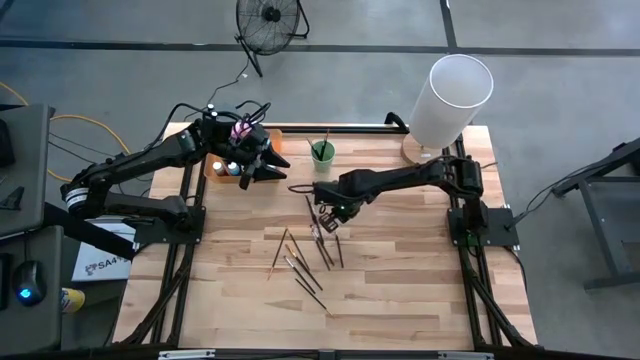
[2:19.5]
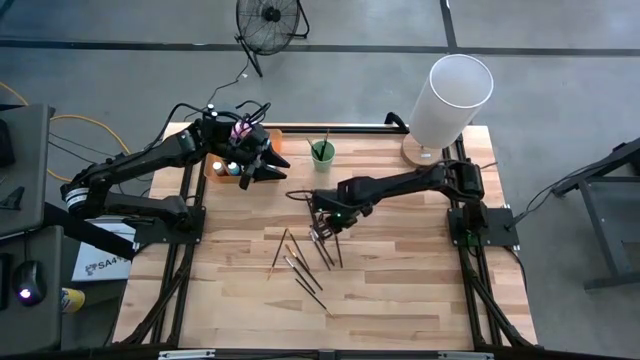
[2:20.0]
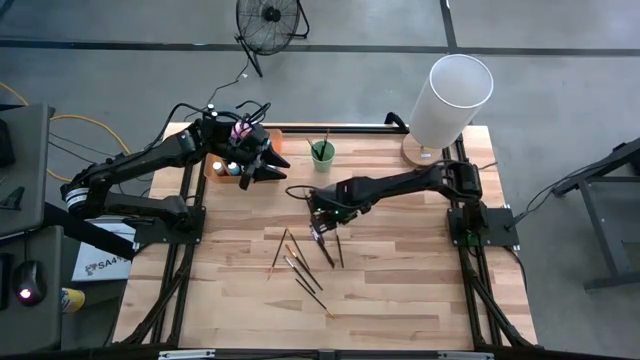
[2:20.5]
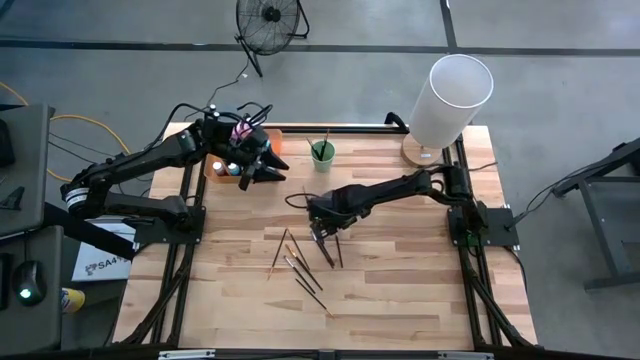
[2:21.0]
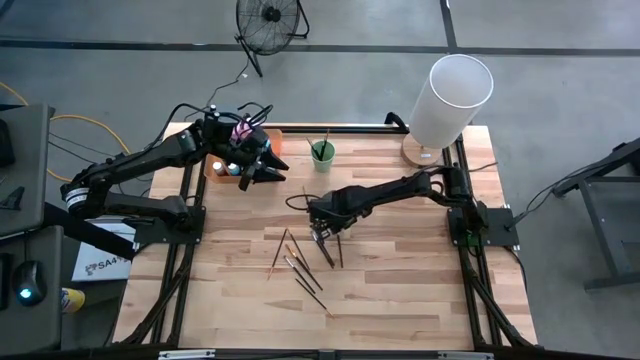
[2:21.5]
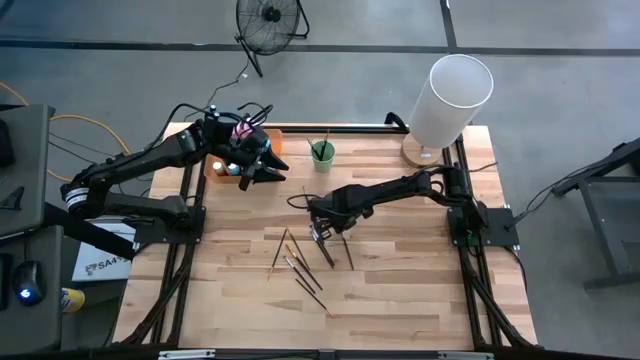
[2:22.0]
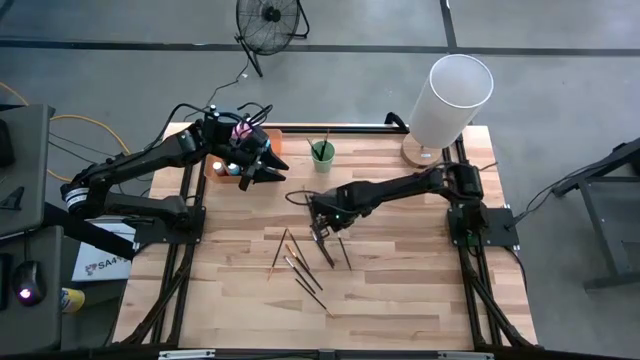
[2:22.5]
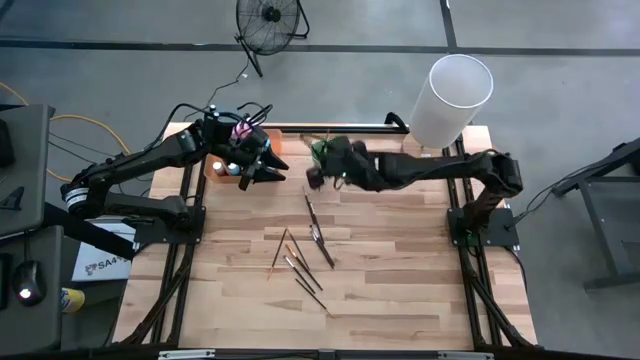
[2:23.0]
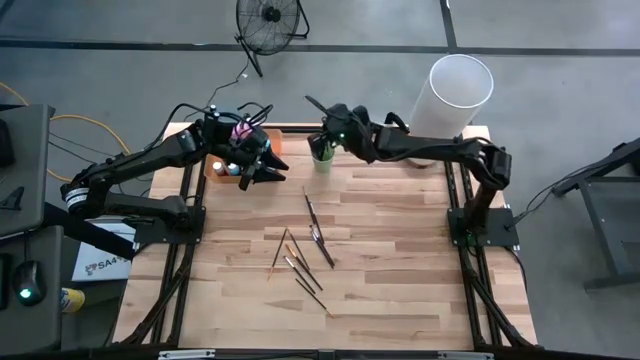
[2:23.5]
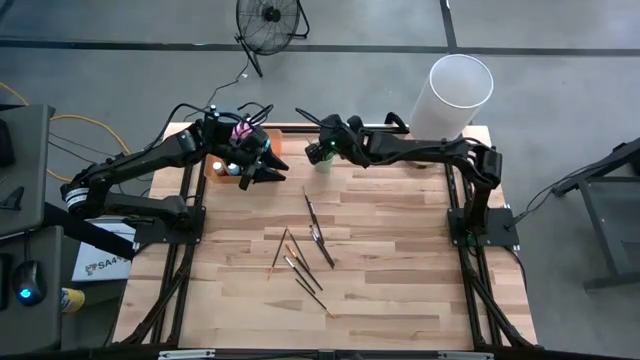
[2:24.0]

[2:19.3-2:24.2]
Task: Pick & Place Paint Supplies
Put the black paint brush into the green cup

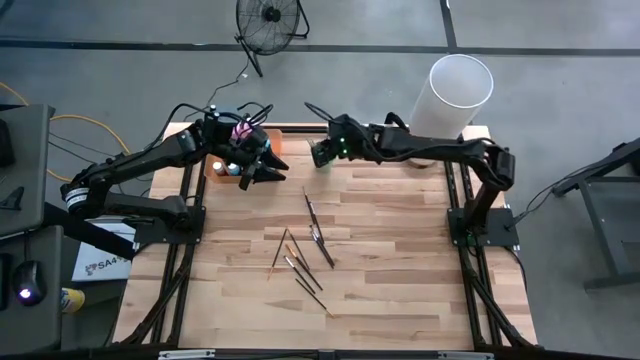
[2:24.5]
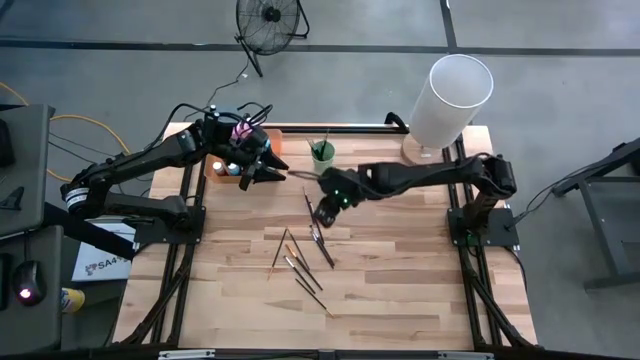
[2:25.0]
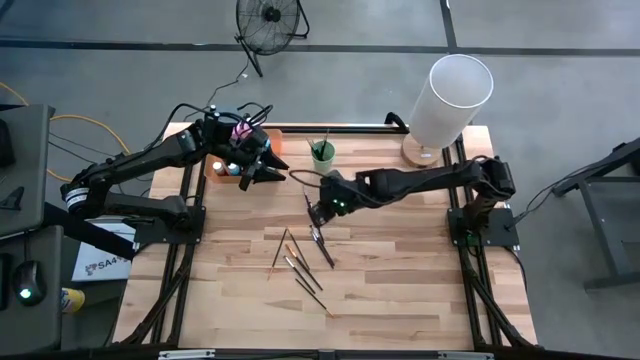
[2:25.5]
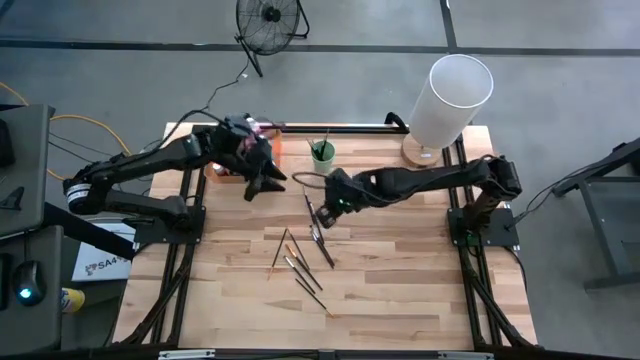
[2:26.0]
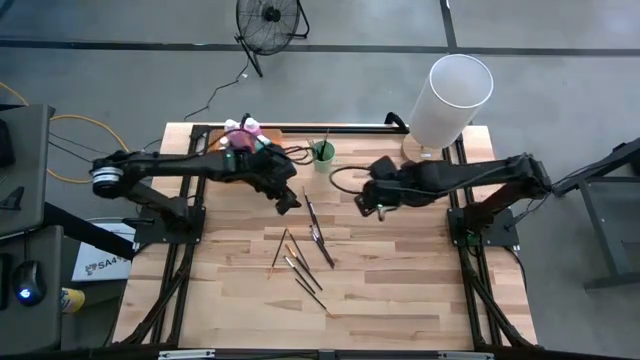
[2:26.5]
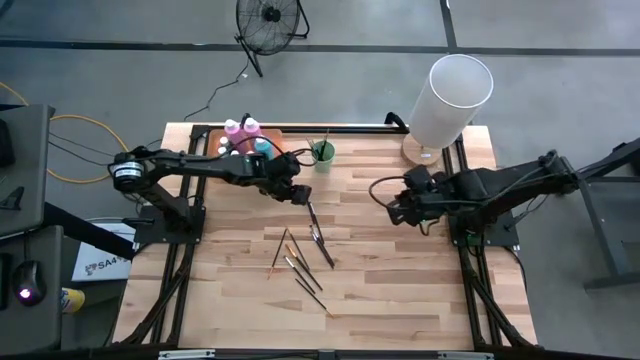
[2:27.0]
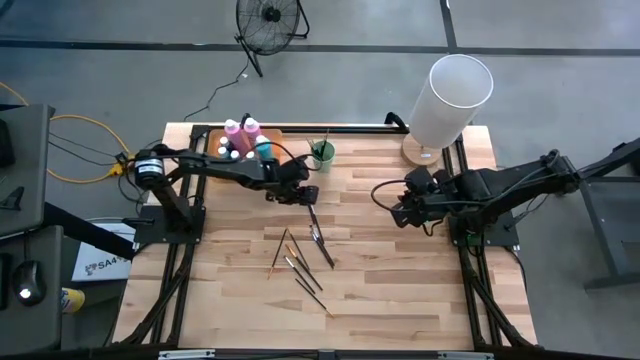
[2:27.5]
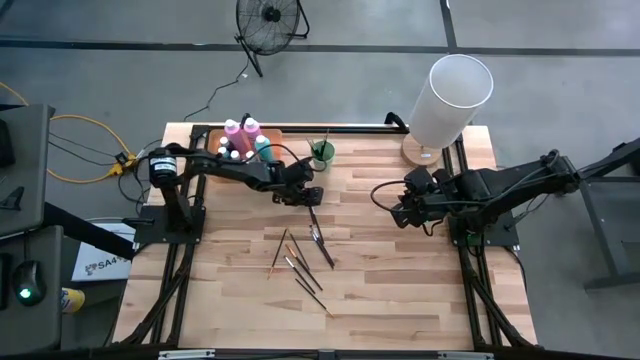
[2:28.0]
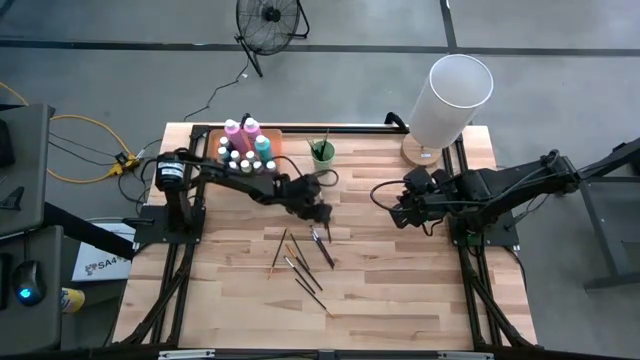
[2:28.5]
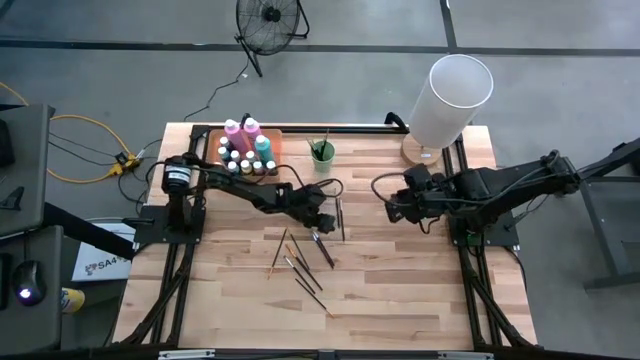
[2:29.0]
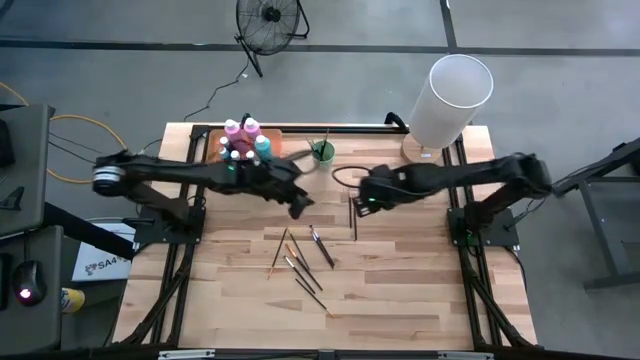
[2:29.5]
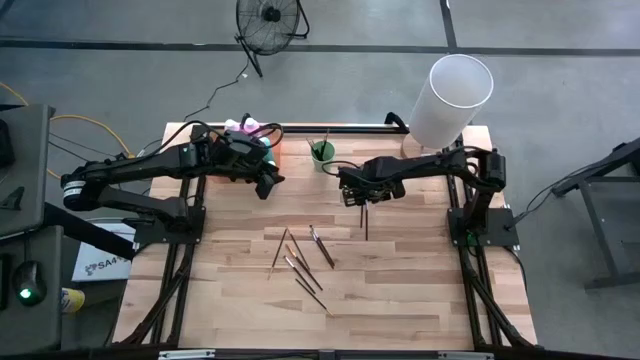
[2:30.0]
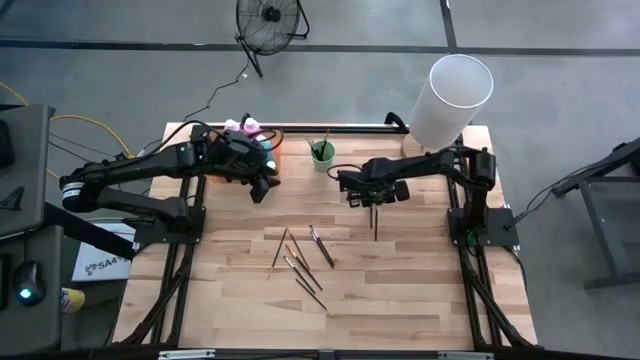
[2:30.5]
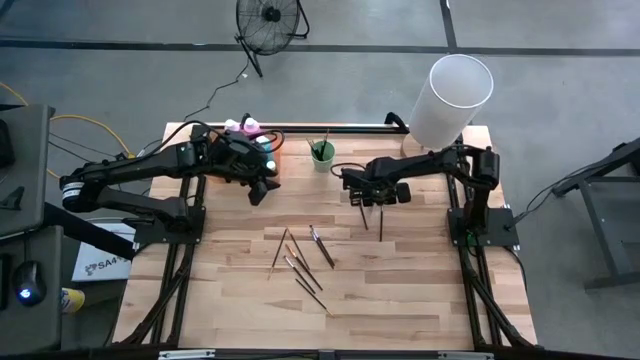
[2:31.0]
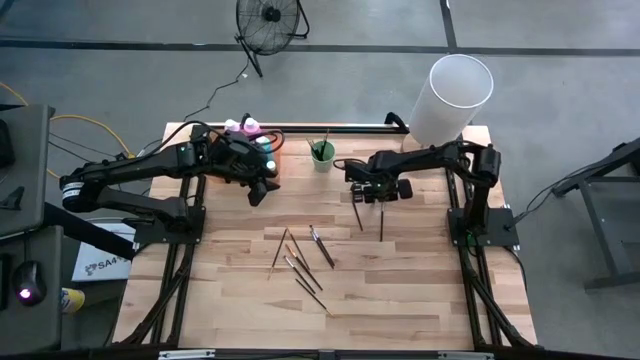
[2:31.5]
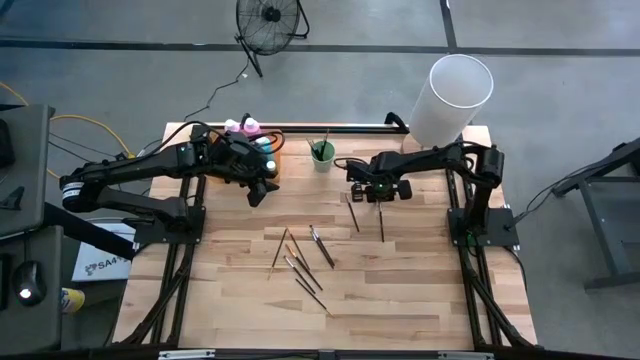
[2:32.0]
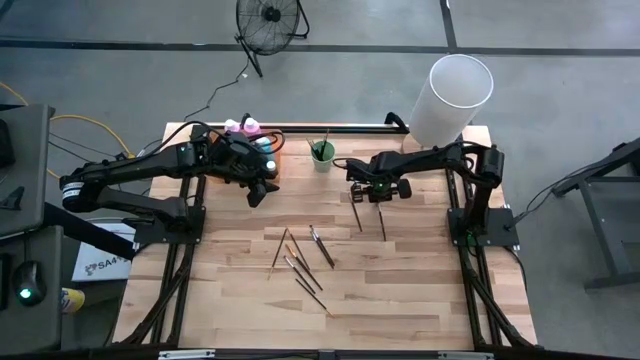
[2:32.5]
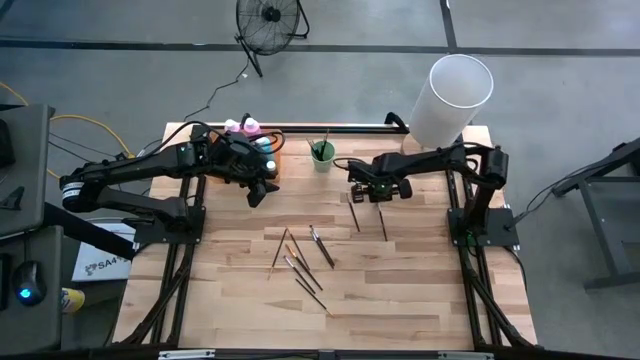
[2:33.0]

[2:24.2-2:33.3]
Put the black paint brush into the green cup

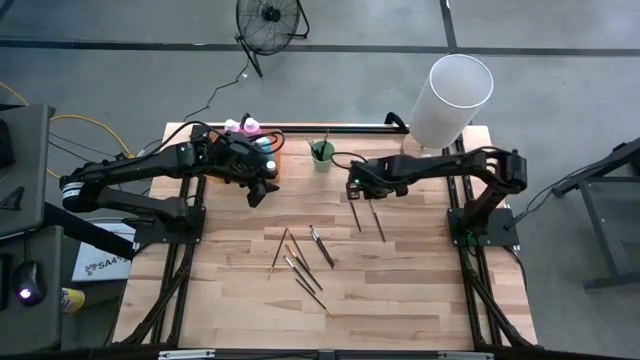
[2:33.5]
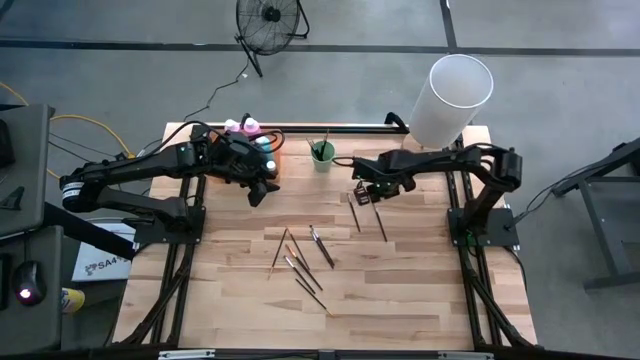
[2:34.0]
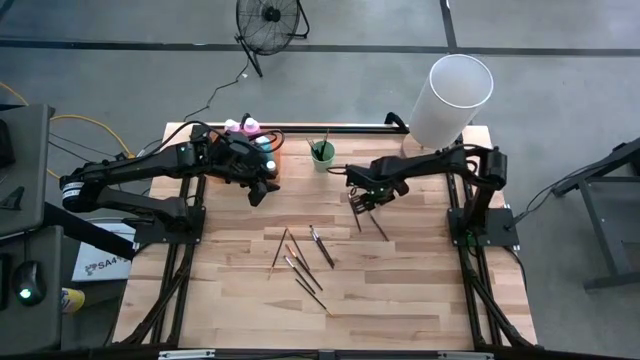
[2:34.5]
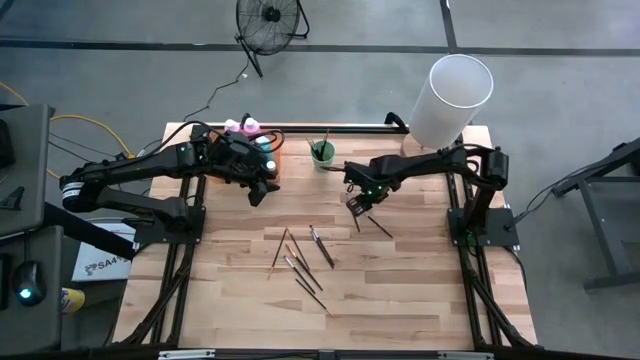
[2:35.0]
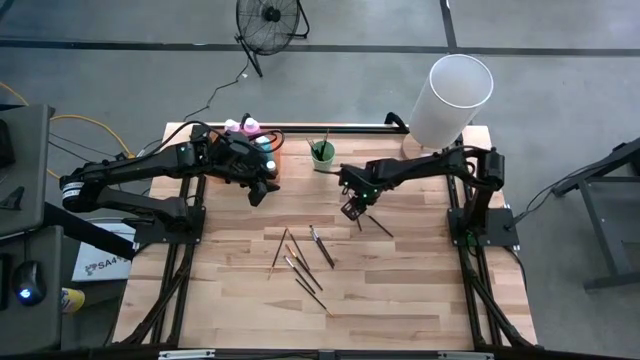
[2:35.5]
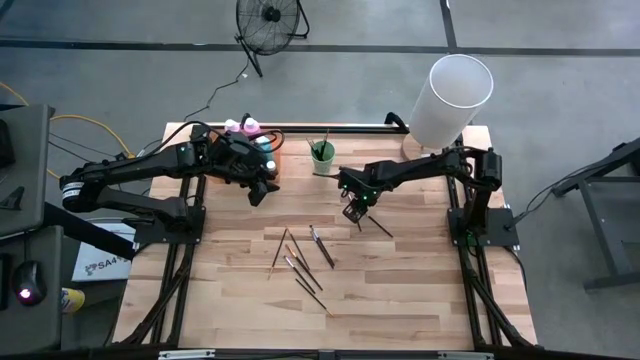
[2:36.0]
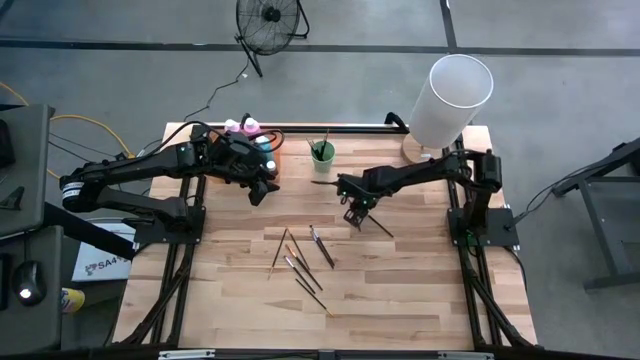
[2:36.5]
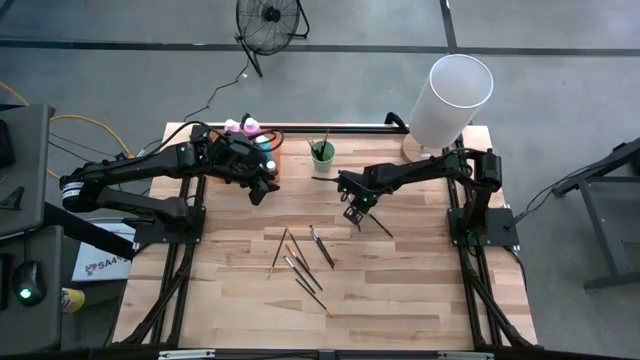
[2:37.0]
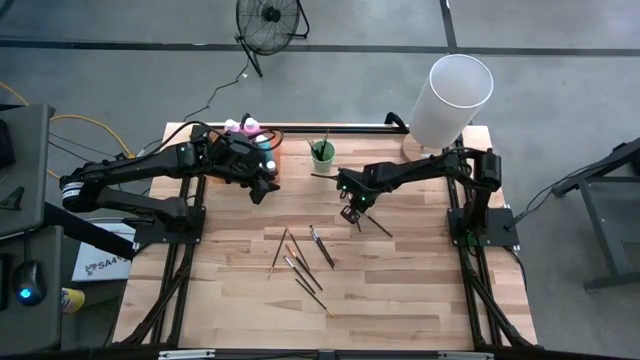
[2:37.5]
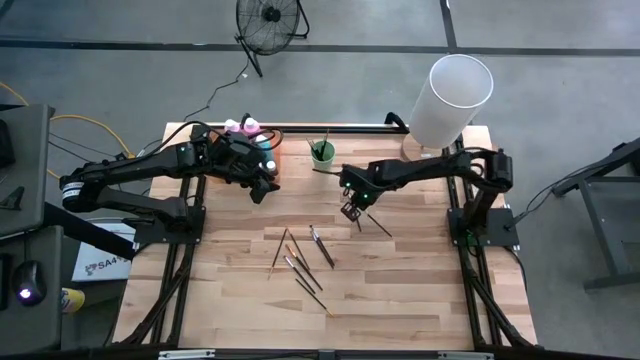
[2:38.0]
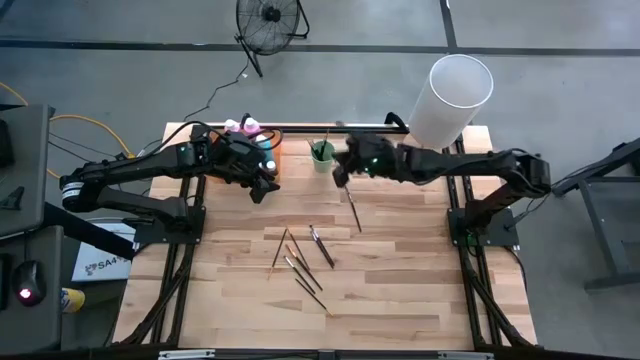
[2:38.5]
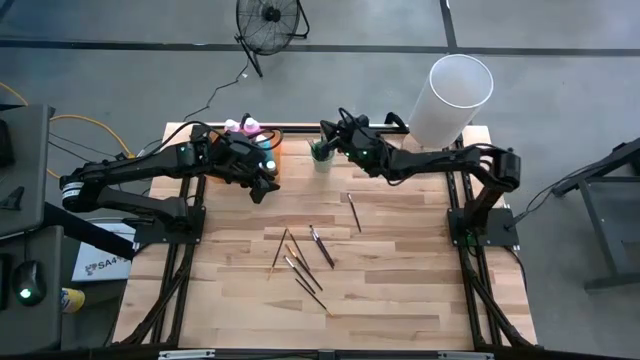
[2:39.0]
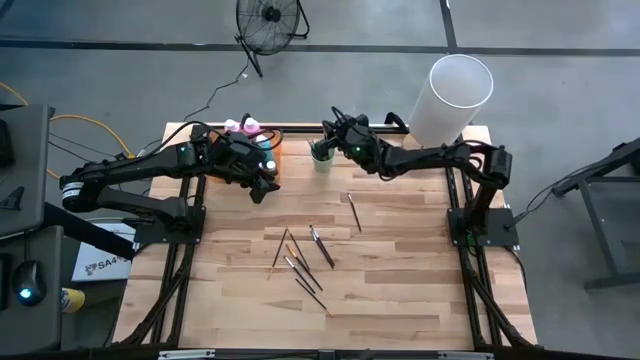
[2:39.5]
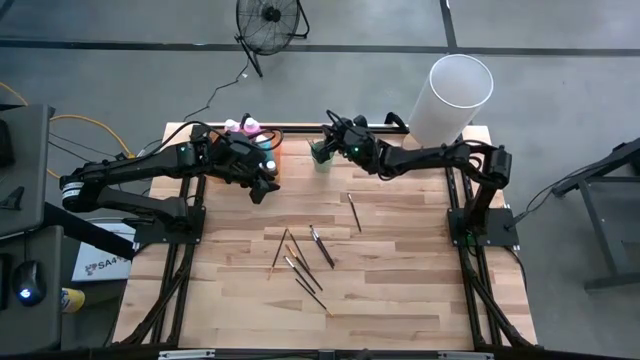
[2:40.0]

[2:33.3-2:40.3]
Put the black paint brush into the green cup
